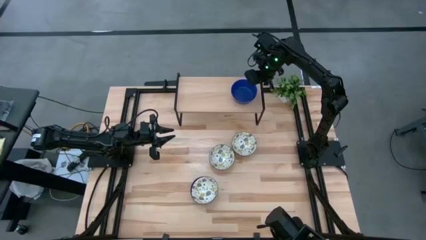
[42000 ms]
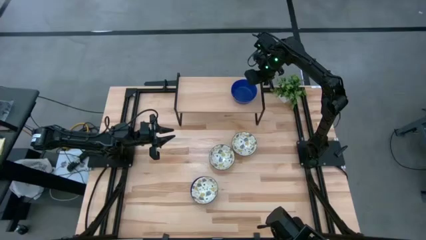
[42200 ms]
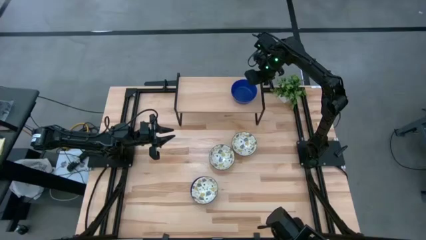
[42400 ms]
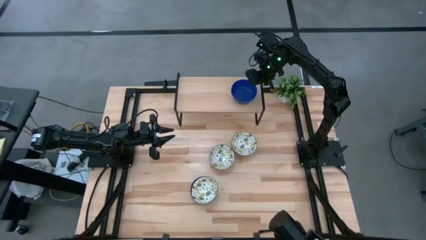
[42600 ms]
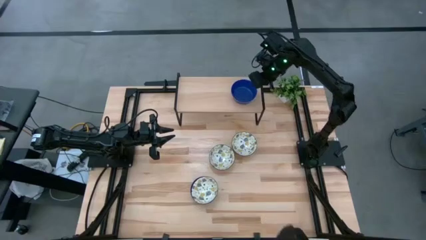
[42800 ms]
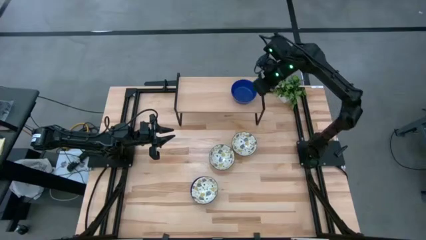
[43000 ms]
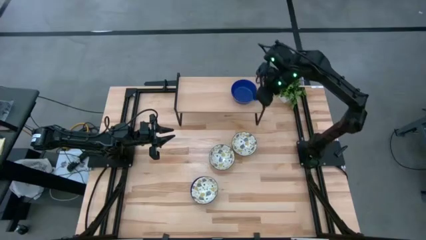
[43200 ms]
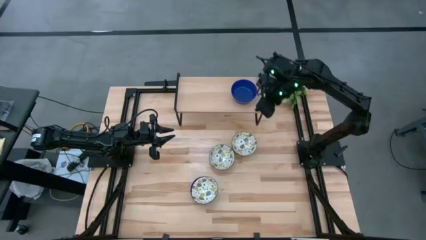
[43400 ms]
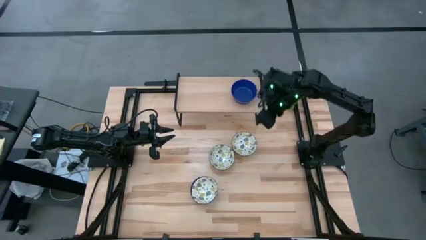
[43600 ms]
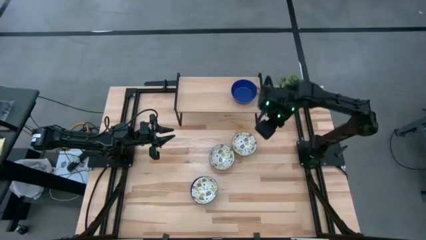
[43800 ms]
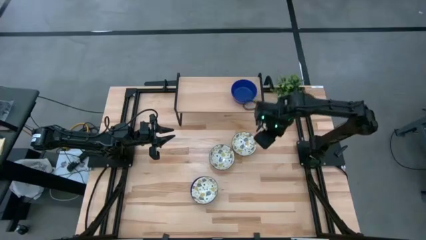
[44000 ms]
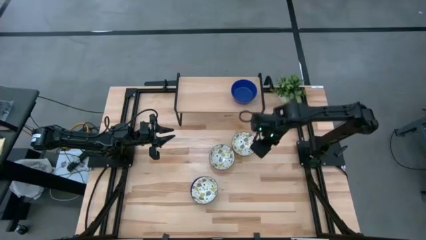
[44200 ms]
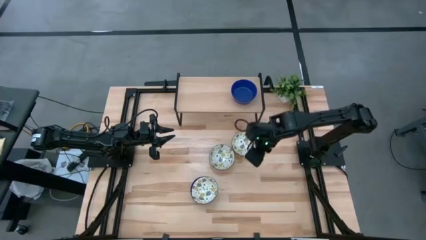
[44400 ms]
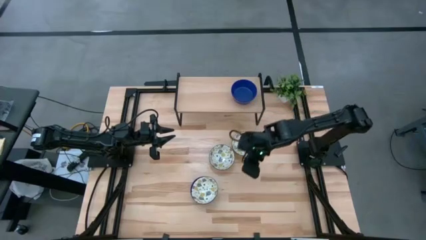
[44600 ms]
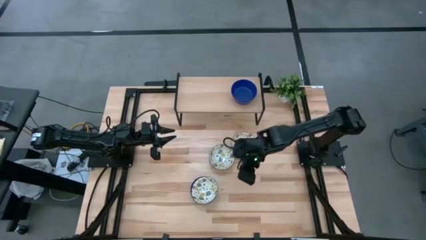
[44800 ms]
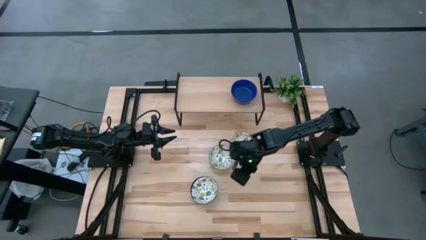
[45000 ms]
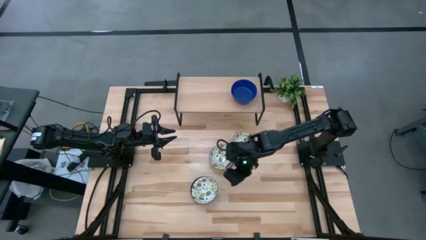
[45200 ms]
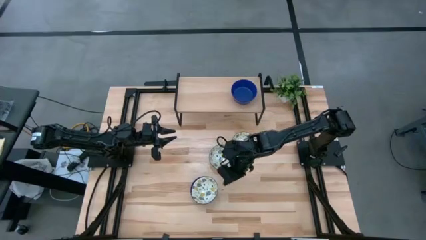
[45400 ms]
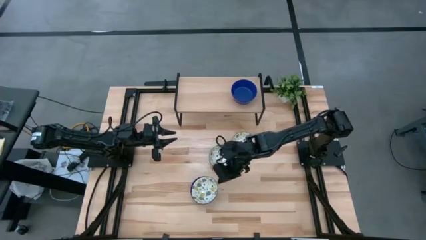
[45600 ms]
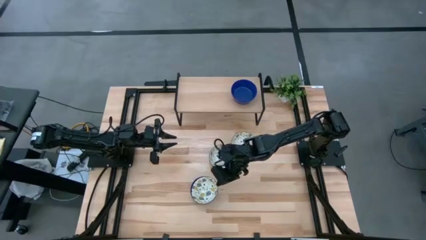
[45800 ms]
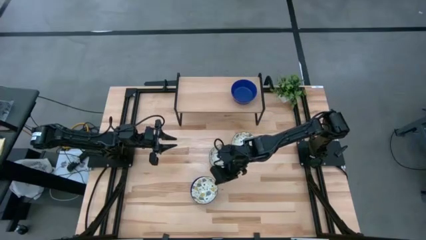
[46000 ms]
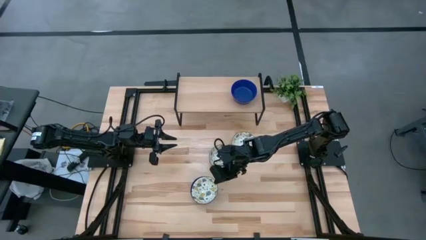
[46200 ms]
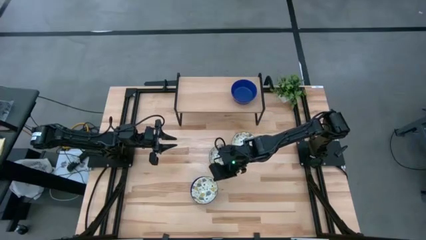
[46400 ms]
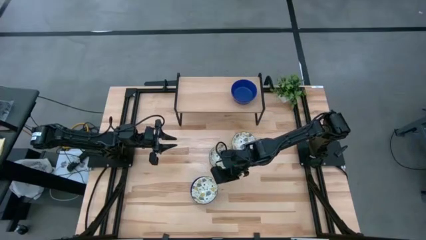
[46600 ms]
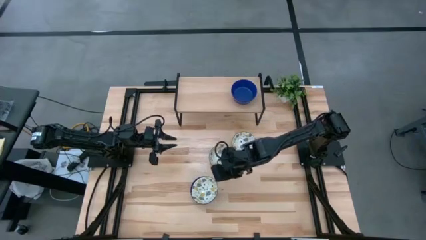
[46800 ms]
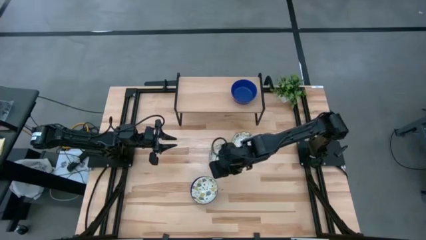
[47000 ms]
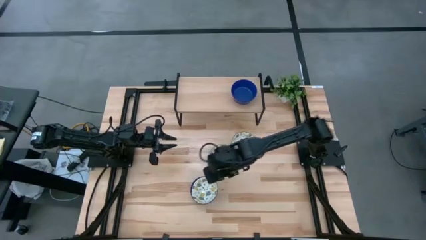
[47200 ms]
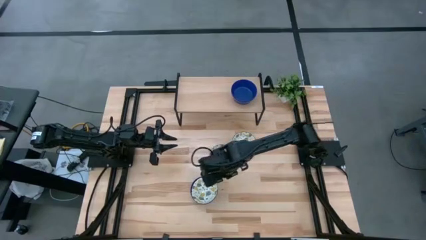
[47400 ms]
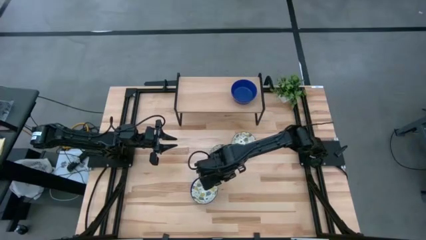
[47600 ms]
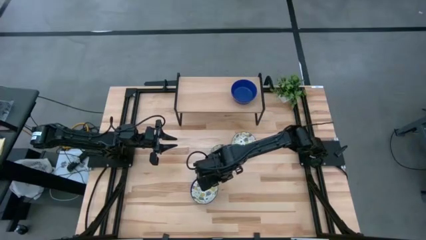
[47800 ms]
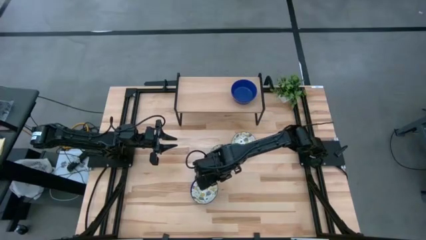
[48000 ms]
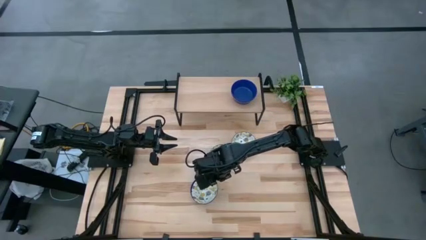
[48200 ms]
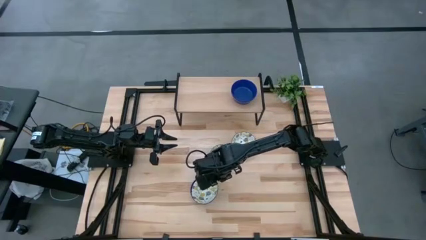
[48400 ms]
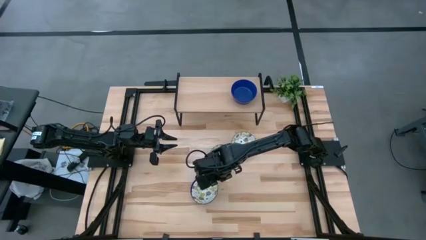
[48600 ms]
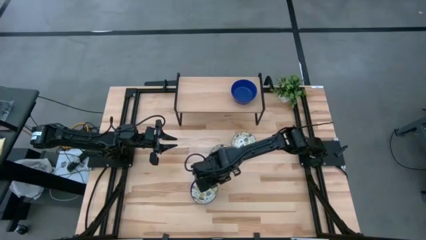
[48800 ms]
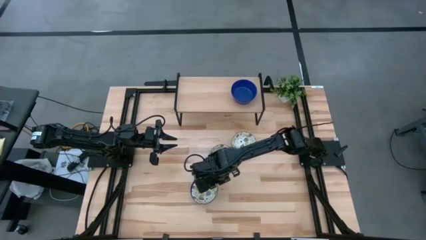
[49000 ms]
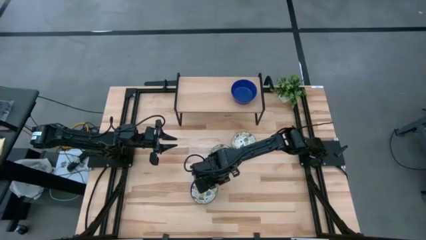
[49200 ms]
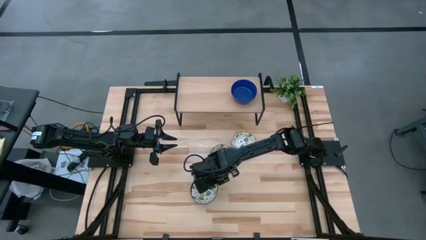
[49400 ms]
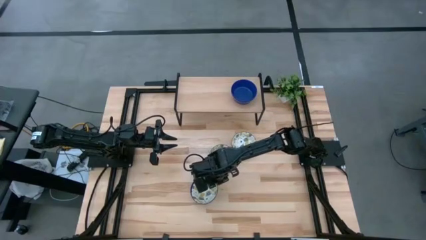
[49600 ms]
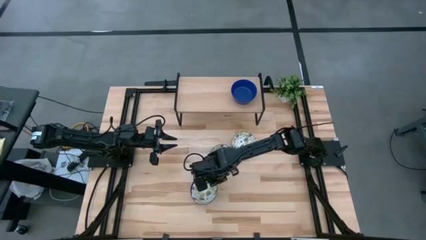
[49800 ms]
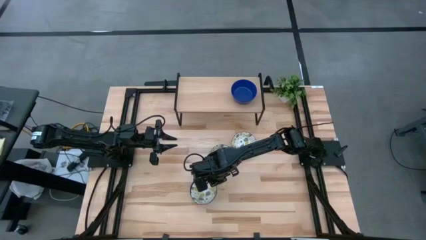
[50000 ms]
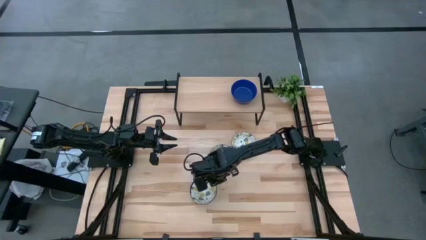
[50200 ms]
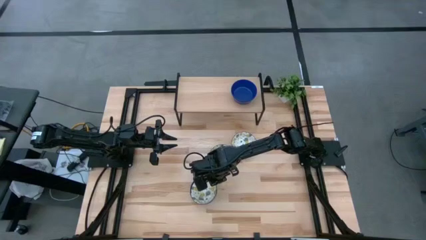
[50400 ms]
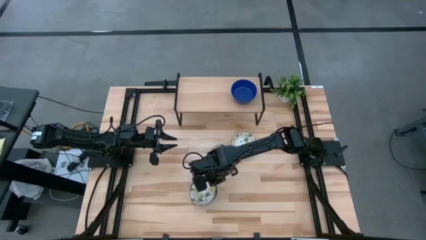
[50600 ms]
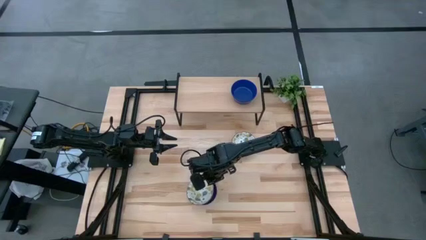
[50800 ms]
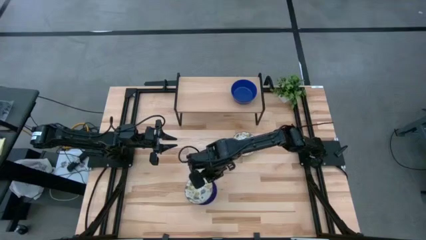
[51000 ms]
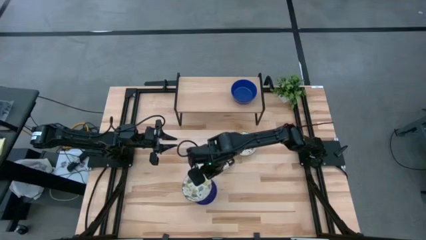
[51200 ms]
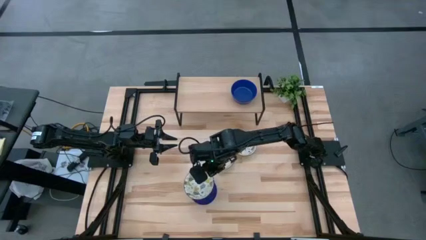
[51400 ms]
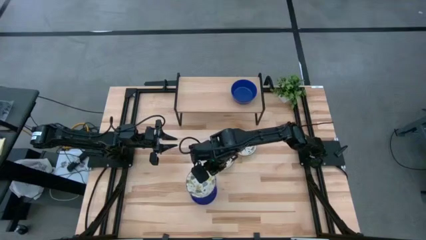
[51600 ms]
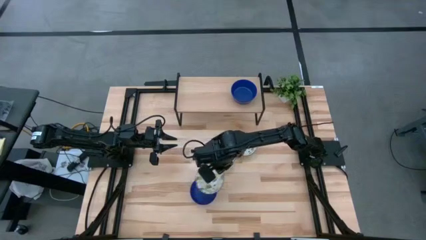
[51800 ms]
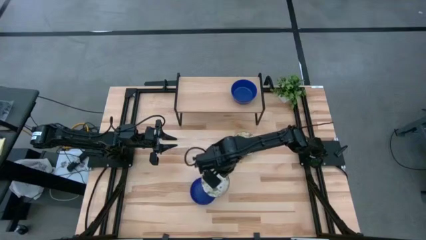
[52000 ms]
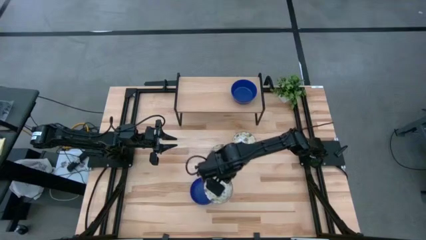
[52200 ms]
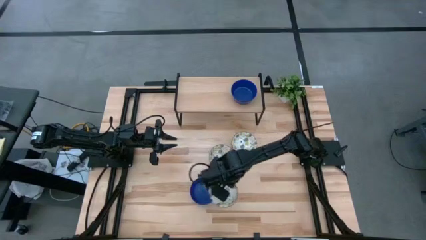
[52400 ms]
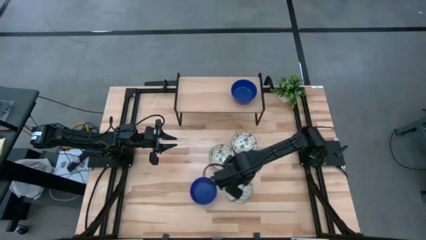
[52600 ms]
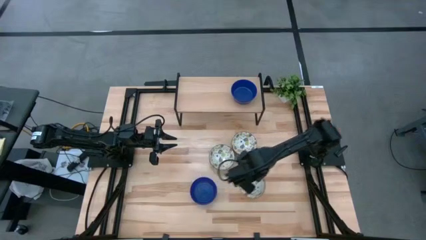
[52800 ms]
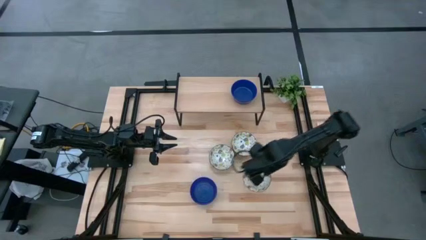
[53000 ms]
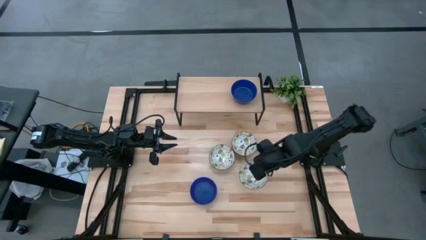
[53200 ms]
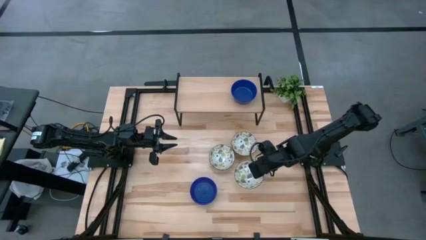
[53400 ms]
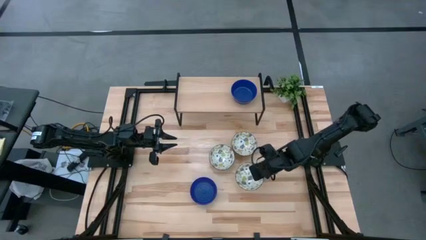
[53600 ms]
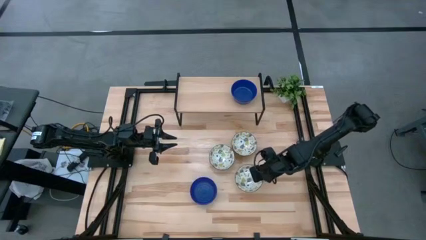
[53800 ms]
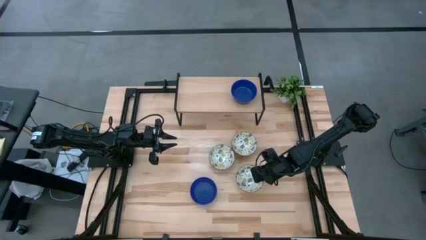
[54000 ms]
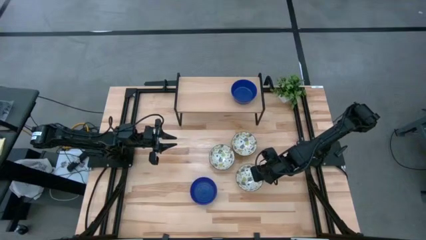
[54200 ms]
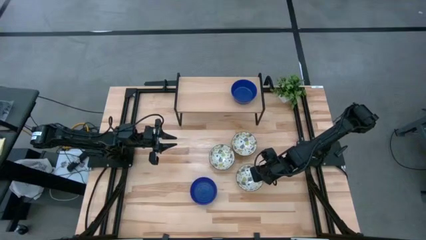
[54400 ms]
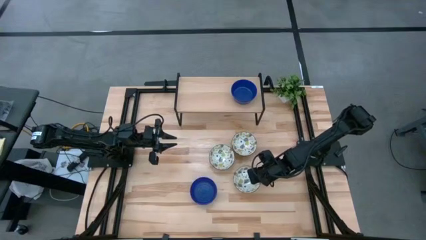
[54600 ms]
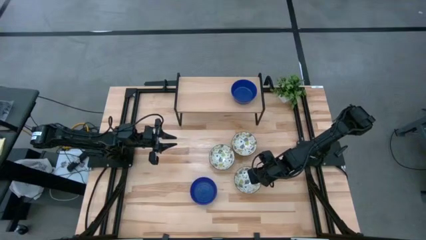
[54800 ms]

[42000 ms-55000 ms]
Task: Pick & Place Mini bowls
Remove the bottom white patterned bowl on top of the blue bowl
